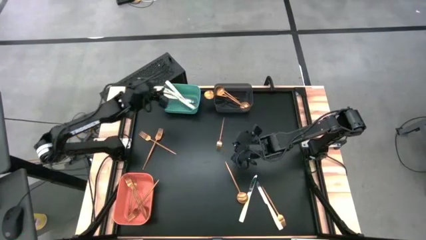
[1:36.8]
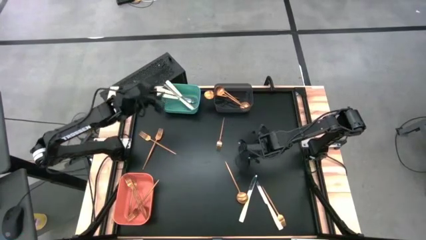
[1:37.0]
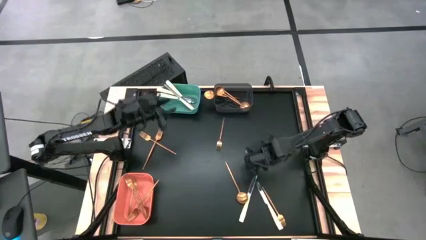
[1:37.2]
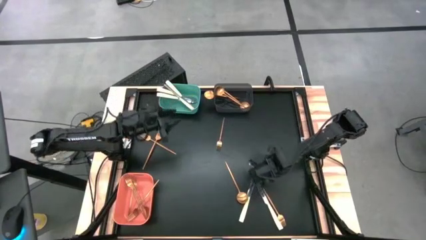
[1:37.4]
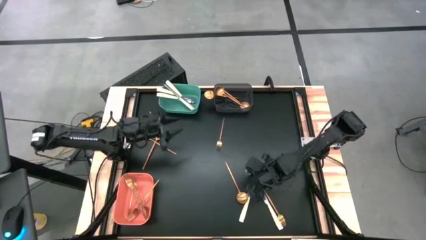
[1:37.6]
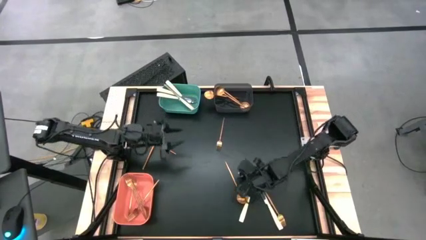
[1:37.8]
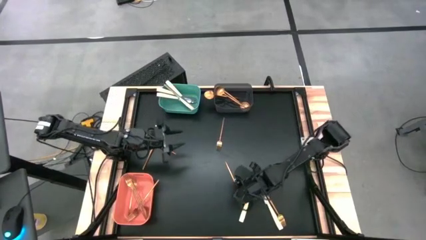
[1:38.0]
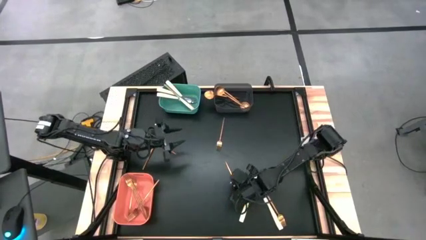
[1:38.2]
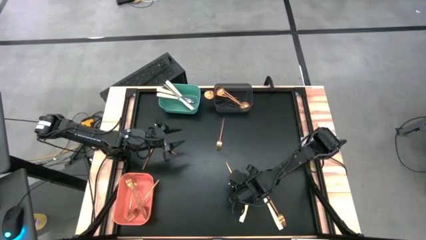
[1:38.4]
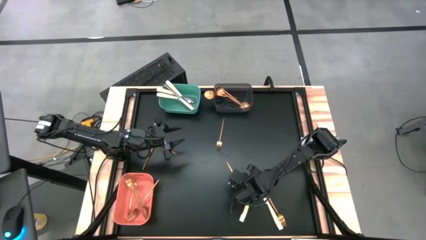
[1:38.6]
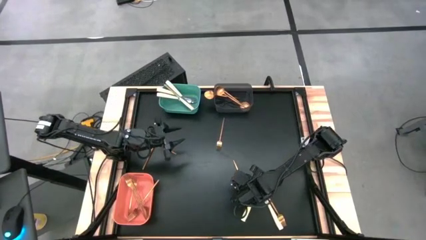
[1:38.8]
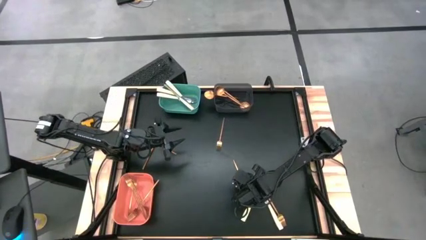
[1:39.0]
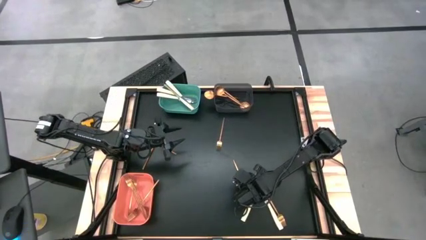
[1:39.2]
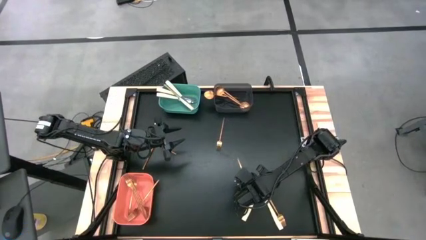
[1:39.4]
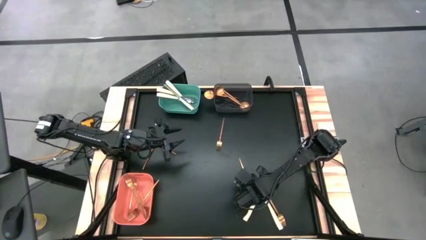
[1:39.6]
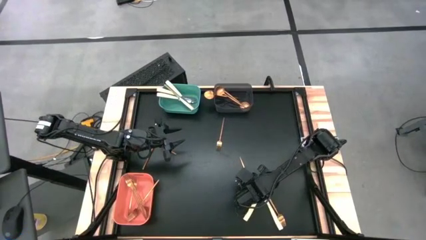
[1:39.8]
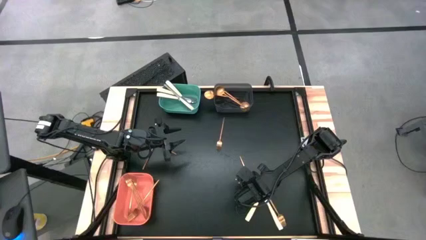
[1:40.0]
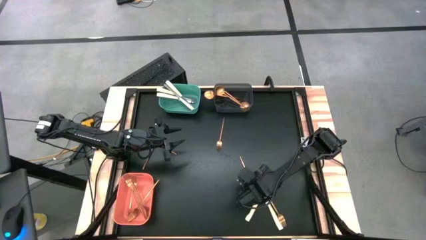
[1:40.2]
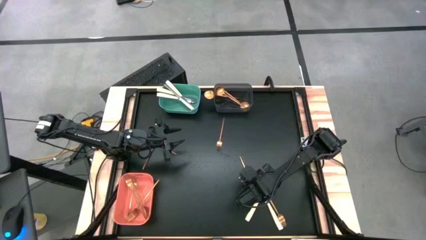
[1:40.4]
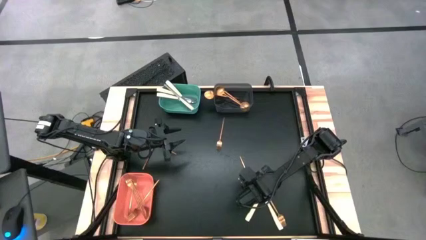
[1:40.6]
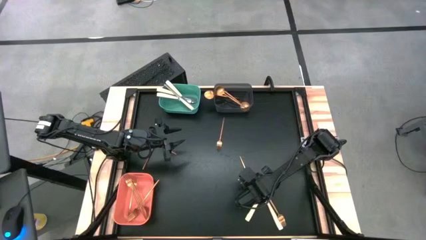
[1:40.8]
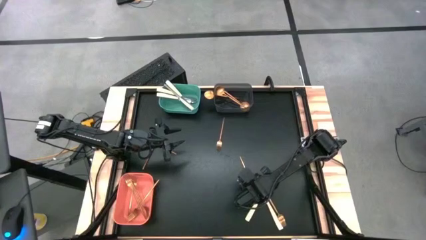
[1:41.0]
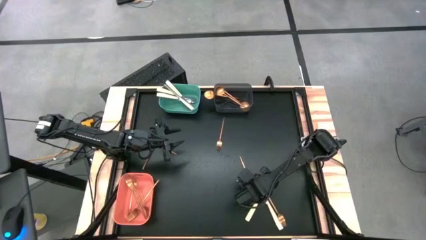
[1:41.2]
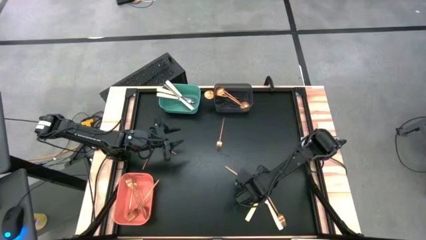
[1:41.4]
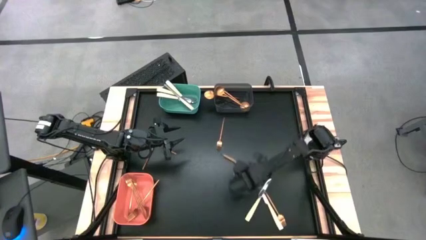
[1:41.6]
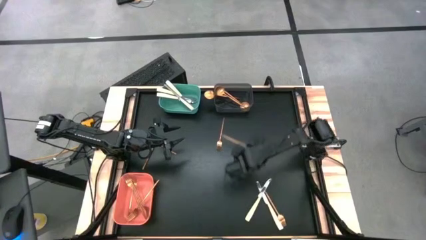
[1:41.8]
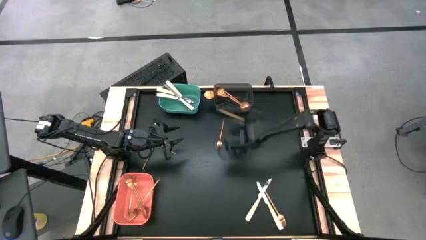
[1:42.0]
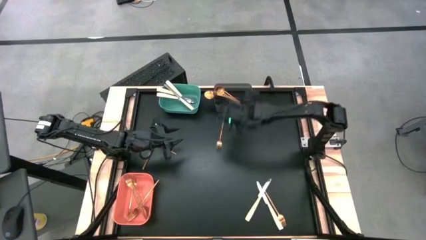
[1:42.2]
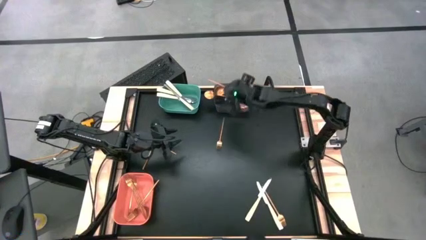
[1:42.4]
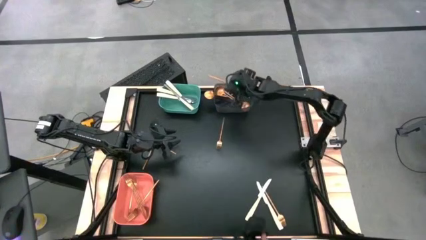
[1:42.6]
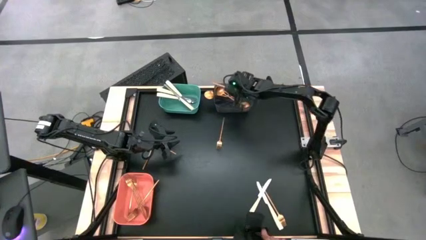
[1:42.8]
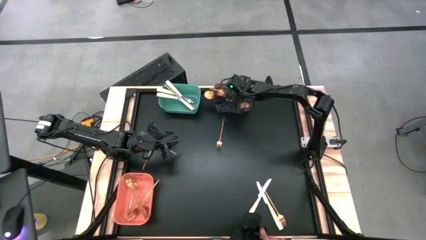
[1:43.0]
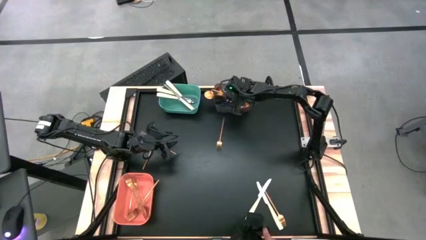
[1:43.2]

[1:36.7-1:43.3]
Task: Sort silverware by color (type)
Put the gold spoon into the black bin

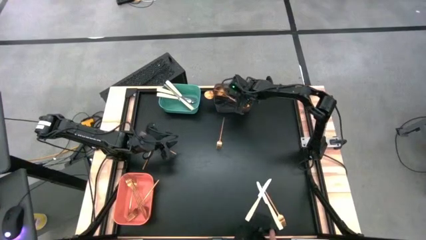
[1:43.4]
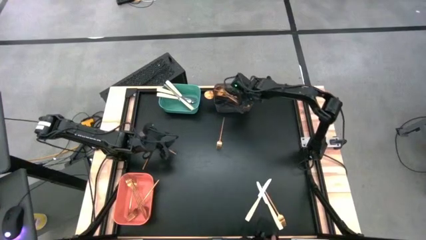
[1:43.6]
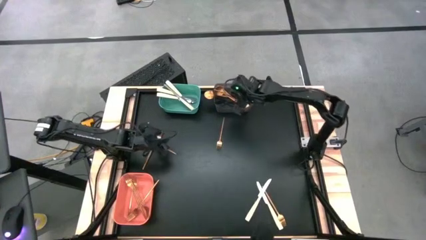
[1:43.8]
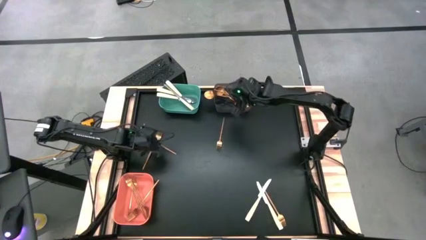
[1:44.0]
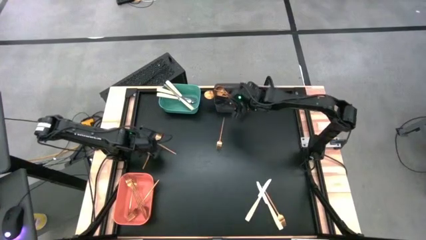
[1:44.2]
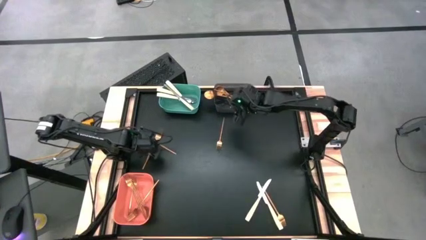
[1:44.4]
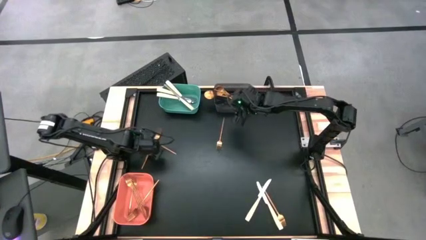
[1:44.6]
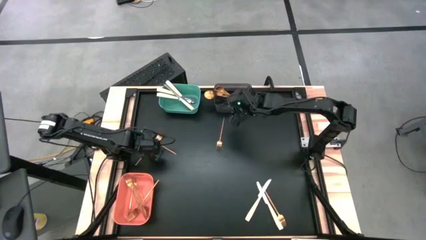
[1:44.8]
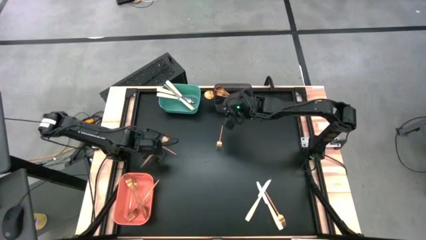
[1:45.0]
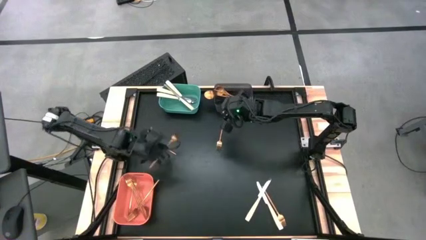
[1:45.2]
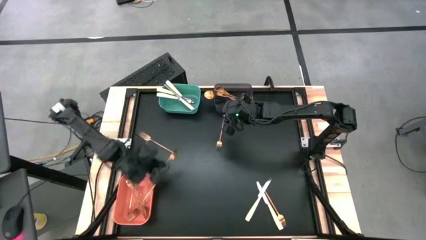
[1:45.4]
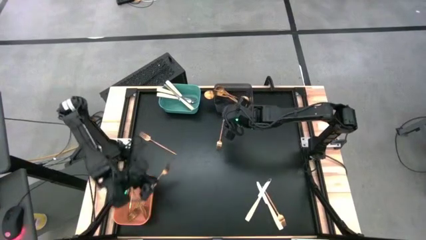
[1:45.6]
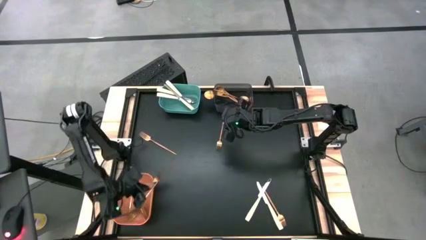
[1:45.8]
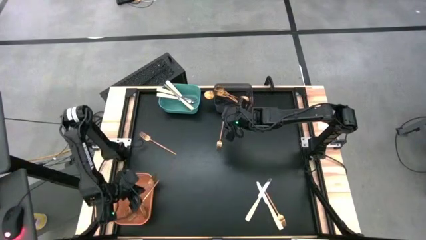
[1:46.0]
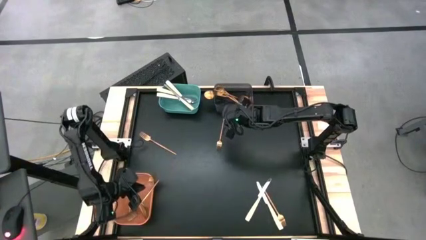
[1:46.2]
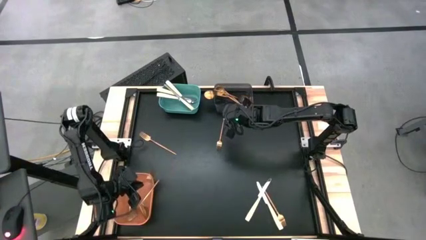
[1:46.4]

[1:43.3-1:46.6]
Put the gold fork into the orange bin

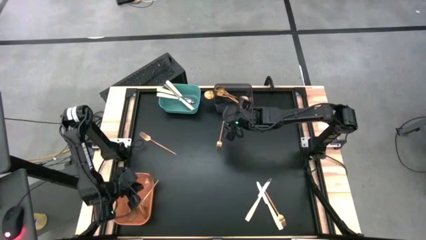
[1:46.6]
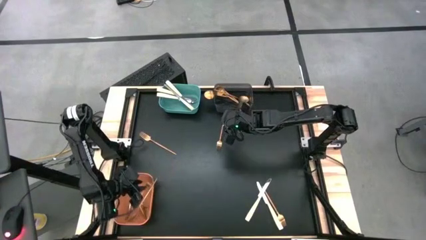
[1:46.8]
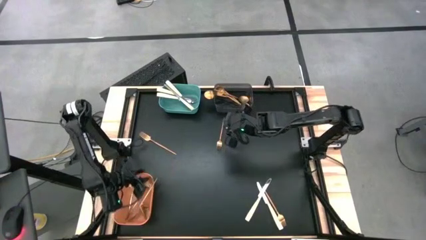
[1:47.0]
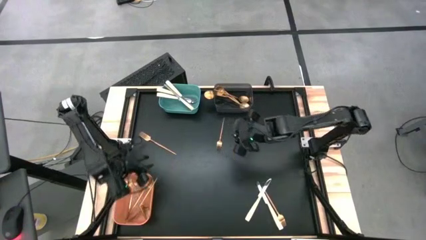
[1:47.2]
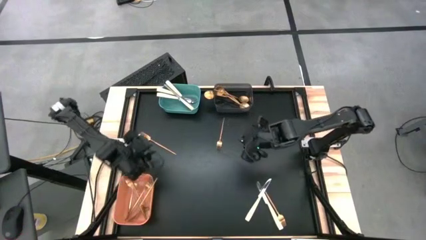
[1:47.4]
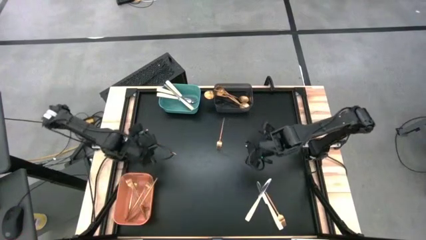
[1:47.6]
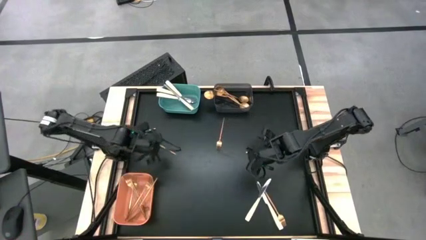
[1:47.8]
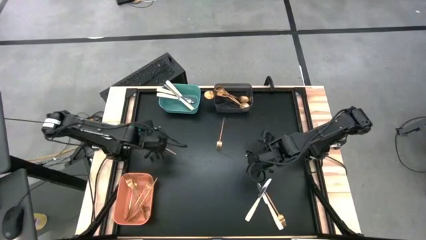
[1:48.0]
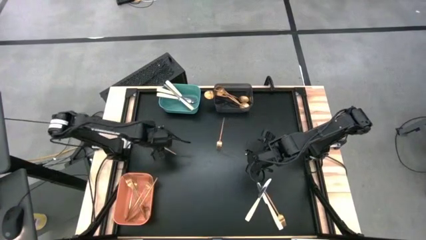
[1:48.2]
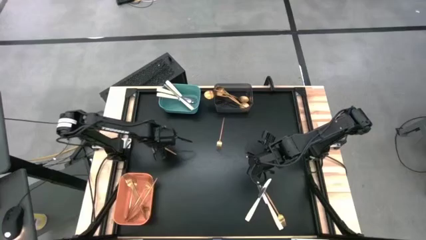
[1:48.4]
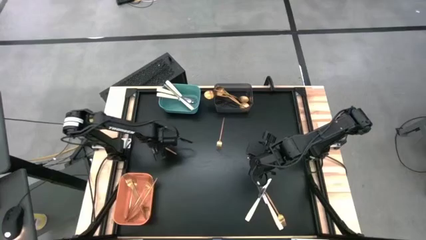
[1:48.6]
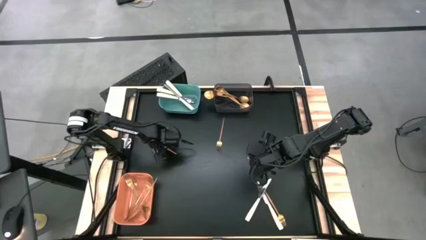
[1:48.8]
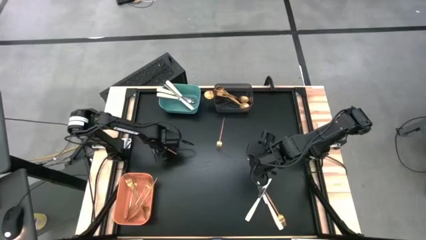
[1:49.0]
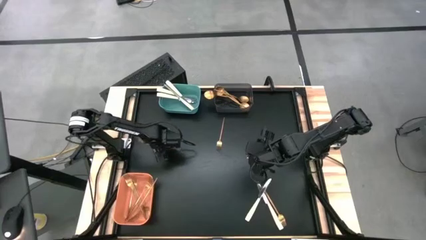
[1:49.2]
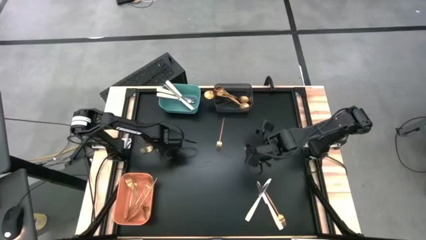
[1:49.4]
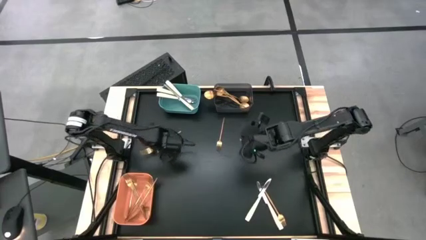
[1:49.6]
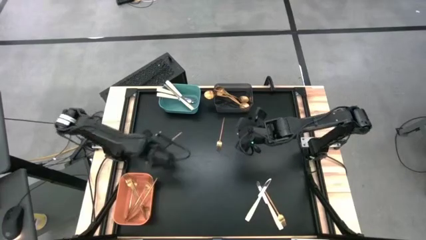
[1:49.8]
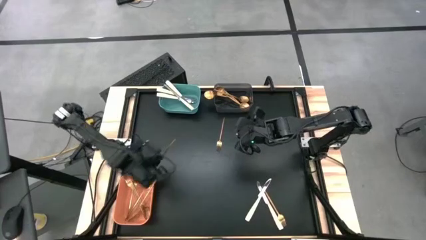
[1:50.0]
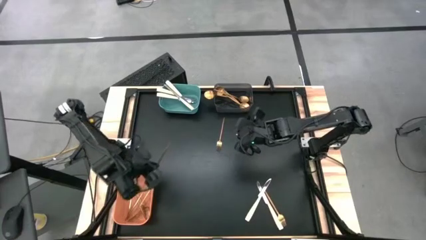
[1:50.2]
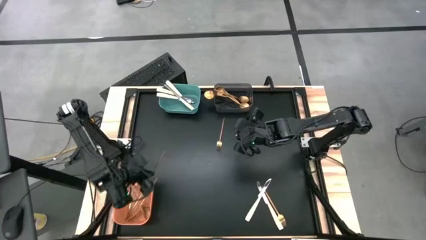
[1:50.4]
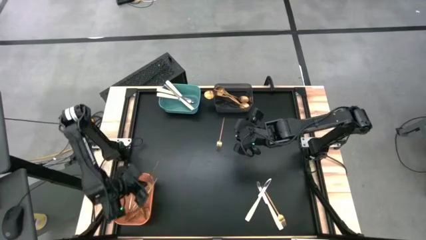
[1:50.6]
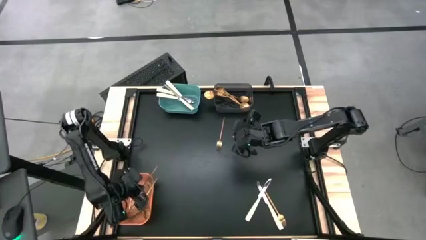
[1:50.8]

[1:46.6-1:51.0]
Put the gold fork into the orange bin

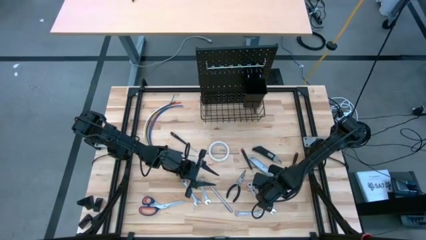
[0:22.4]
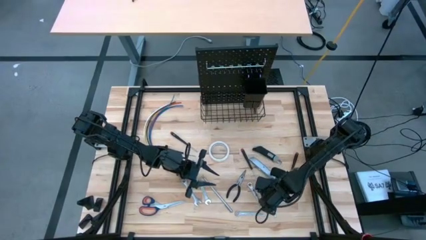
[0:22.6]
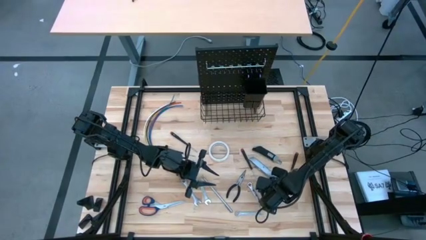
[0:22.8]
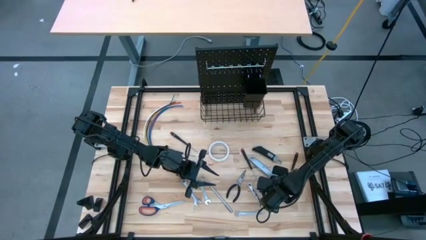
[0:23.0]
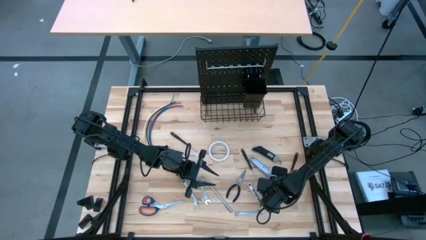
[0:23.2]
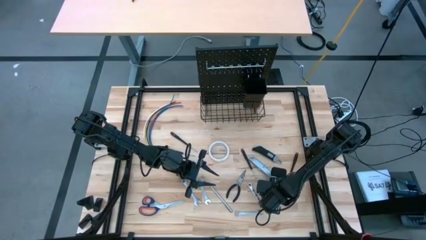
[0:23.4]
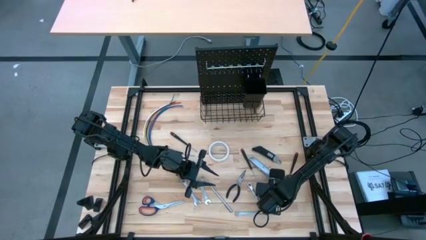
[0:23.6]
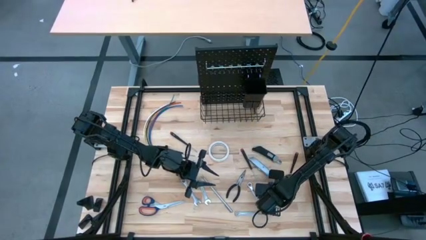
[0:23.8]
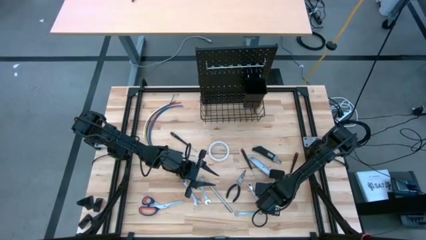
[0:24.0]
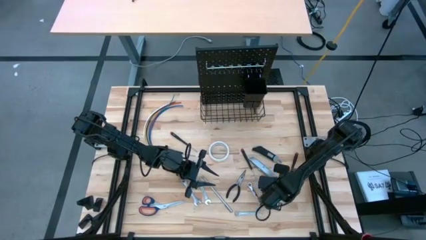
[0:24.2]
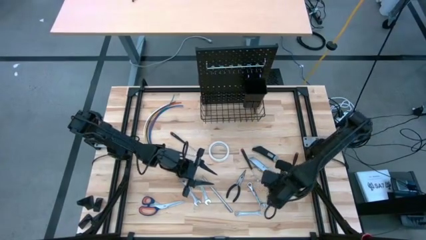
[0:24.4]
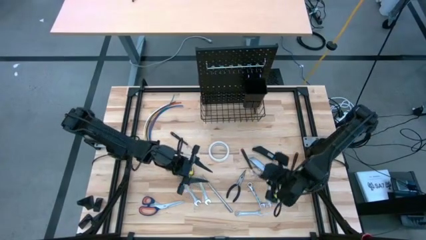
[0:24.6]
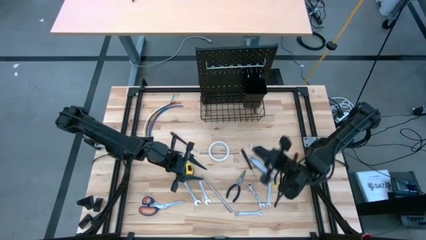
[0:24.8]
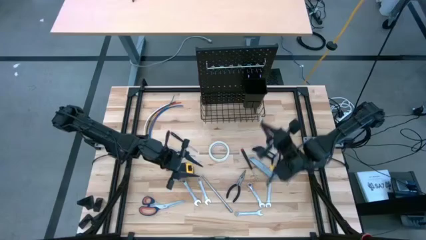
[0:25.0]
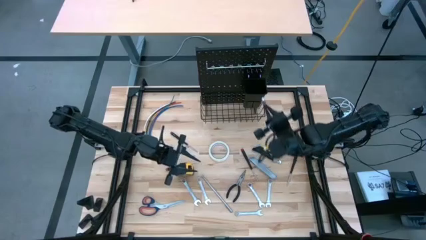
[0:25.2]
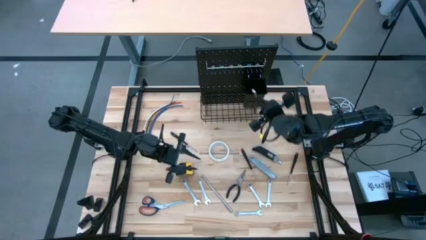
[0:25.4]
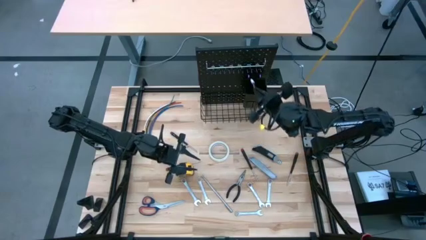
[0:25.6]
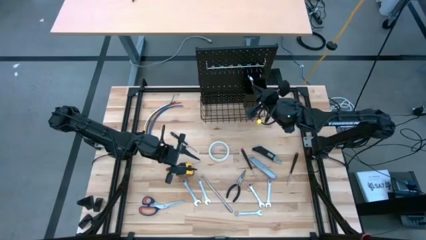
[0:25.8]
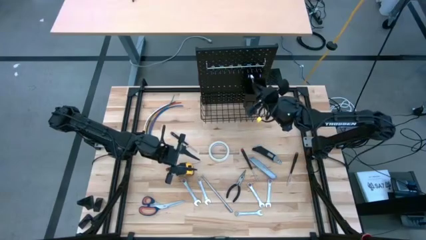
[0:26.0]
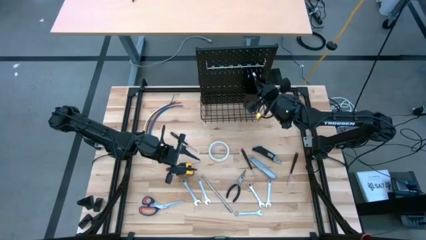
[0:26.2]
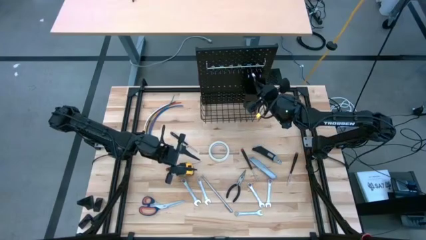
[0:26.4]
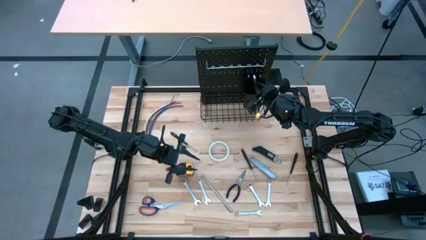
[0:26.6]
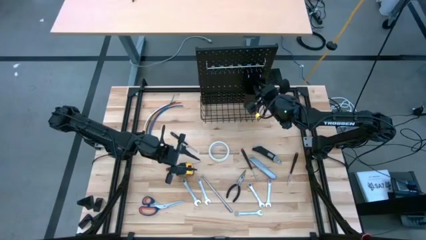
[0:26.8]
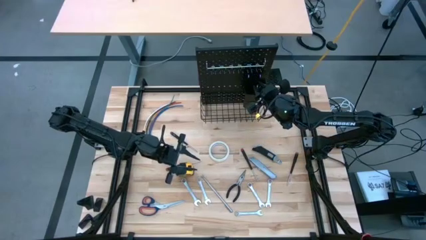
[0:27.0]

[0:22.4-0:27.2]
Task: Hang tools onto peg board
Put the wrench into the black bin on the peg board
